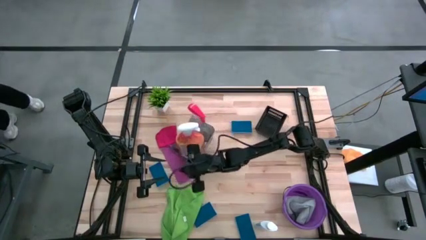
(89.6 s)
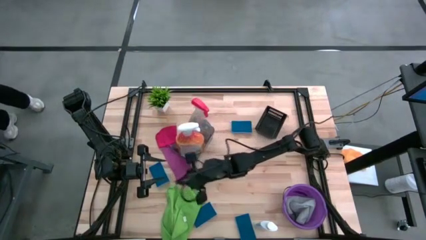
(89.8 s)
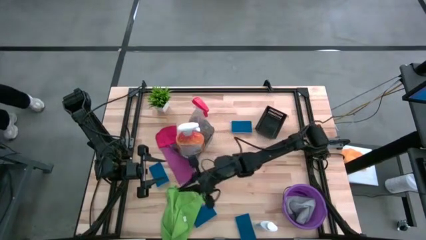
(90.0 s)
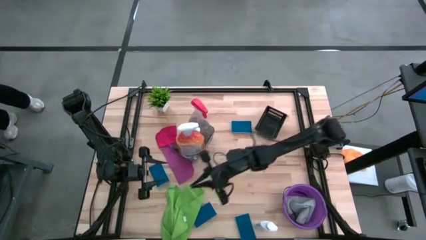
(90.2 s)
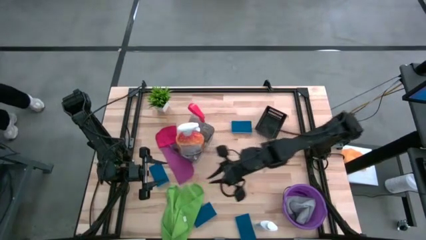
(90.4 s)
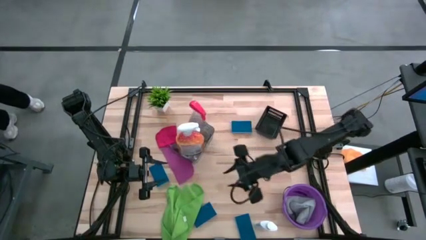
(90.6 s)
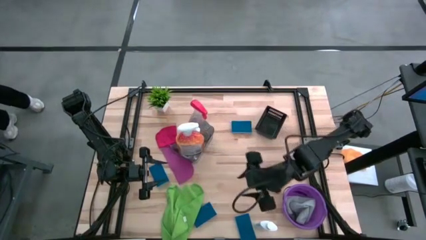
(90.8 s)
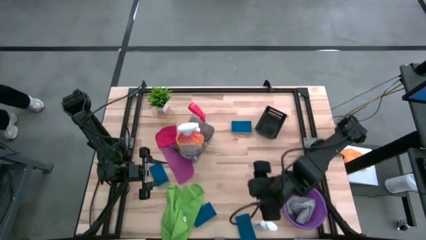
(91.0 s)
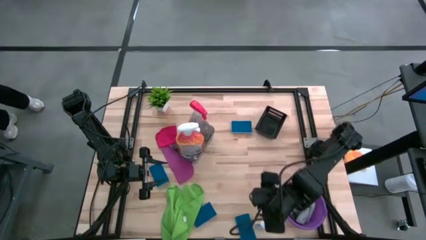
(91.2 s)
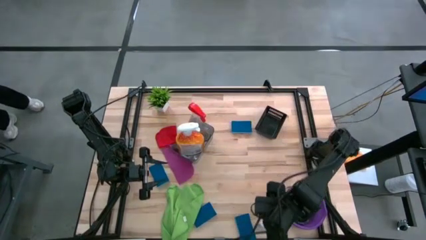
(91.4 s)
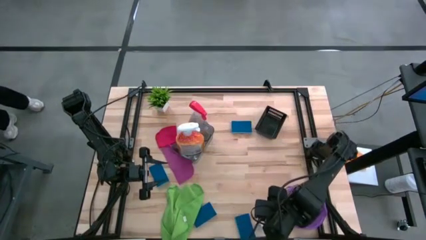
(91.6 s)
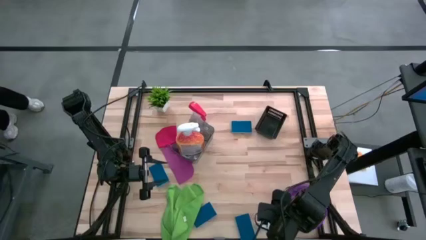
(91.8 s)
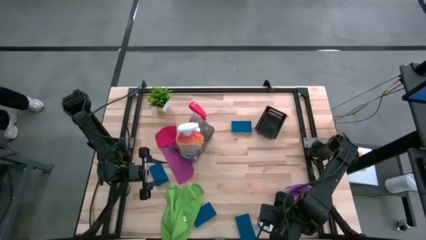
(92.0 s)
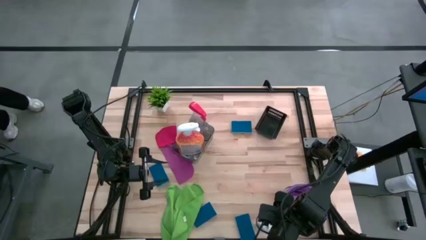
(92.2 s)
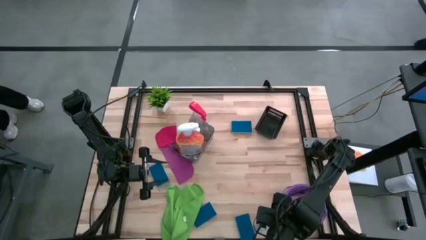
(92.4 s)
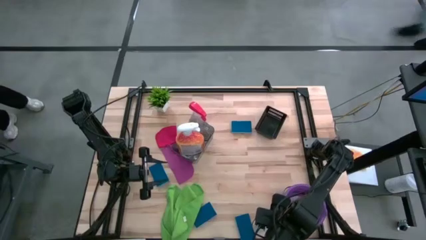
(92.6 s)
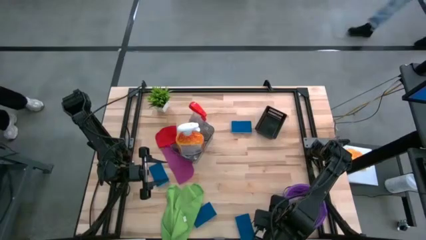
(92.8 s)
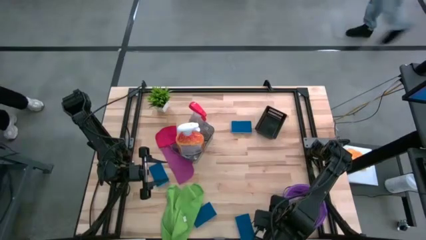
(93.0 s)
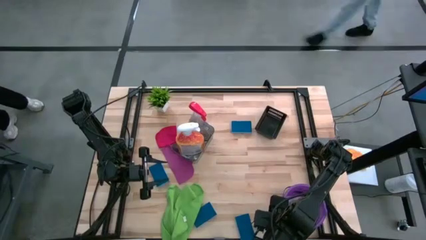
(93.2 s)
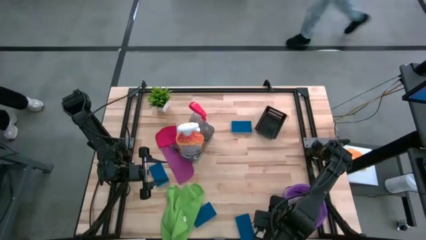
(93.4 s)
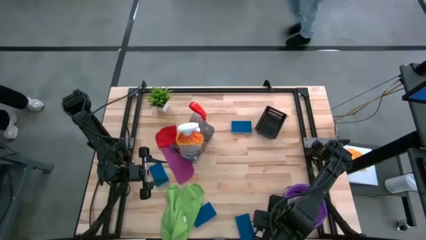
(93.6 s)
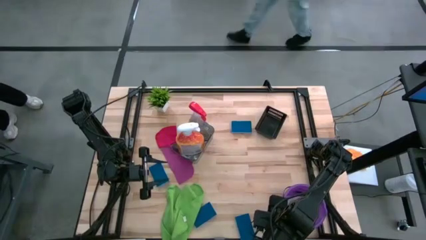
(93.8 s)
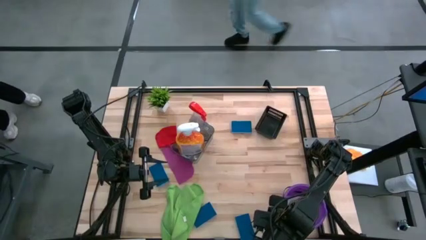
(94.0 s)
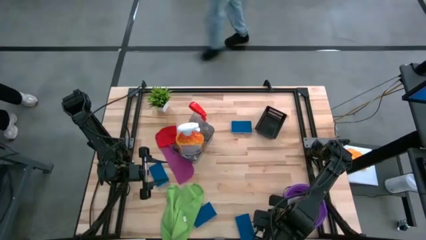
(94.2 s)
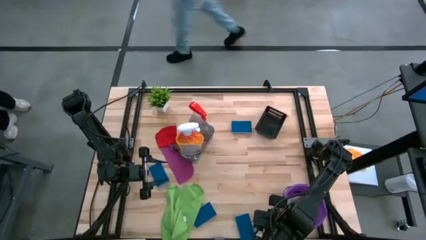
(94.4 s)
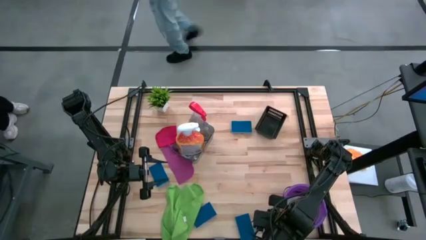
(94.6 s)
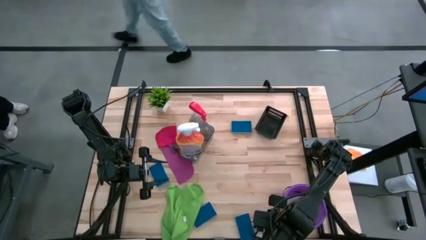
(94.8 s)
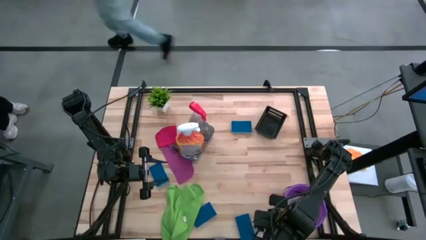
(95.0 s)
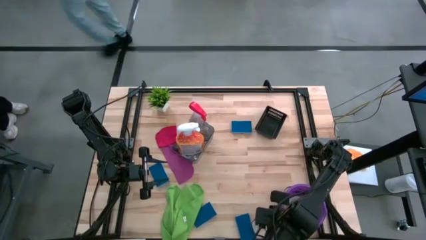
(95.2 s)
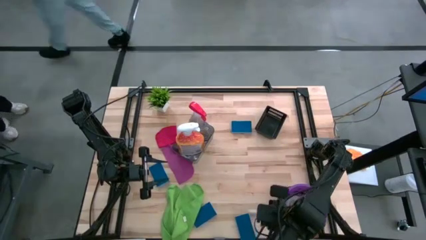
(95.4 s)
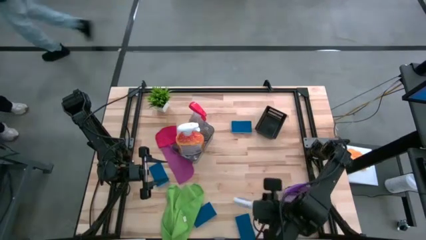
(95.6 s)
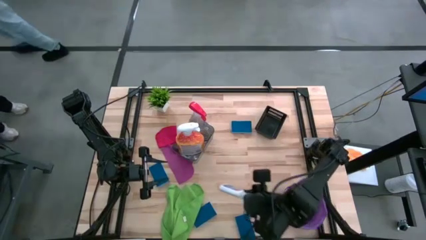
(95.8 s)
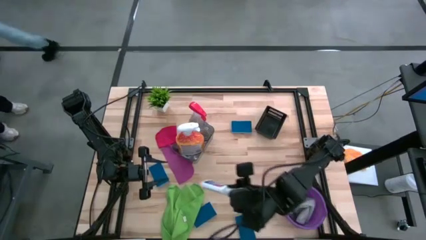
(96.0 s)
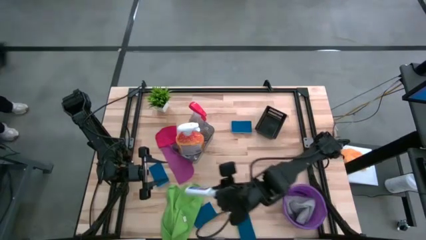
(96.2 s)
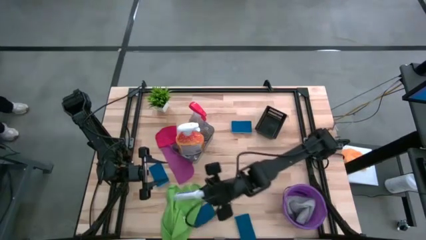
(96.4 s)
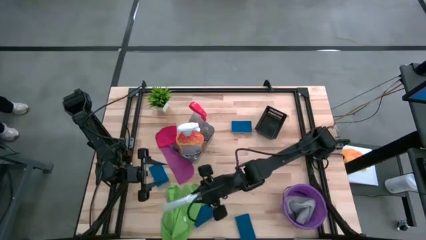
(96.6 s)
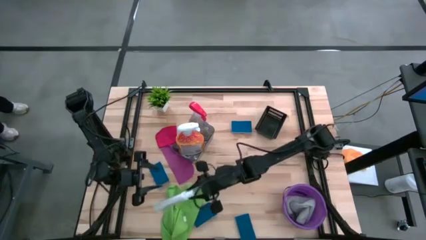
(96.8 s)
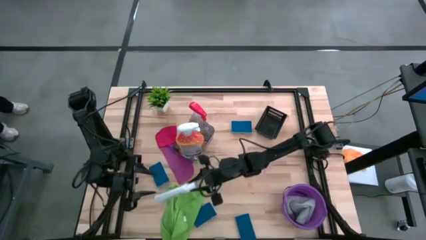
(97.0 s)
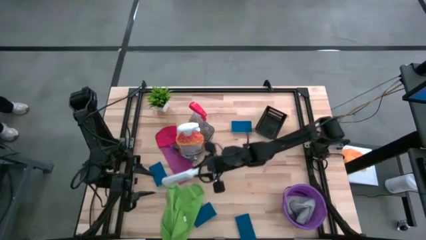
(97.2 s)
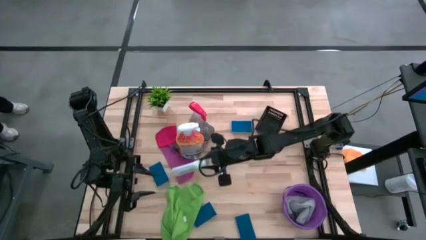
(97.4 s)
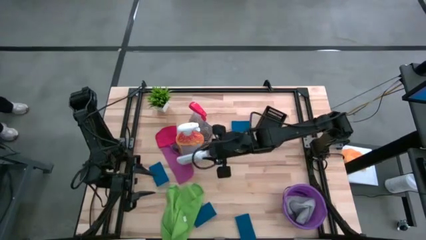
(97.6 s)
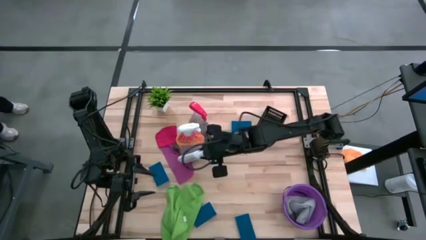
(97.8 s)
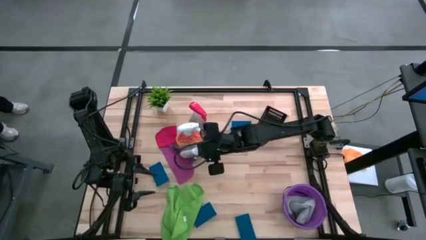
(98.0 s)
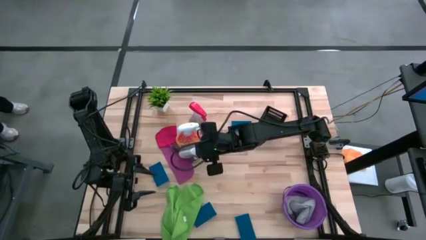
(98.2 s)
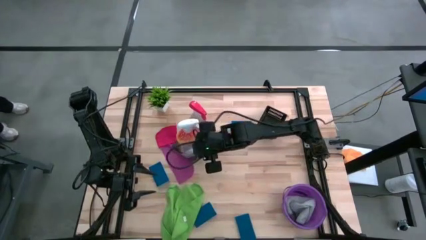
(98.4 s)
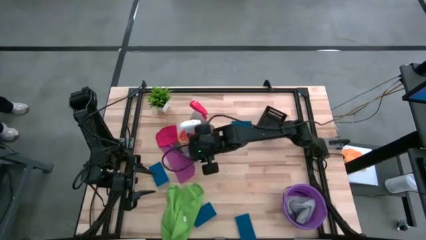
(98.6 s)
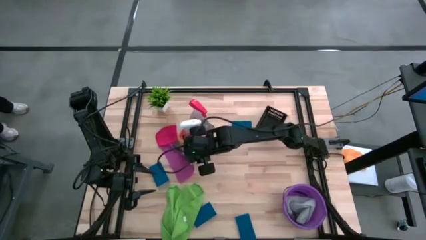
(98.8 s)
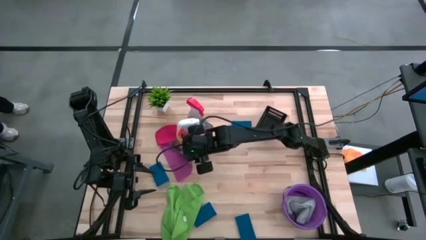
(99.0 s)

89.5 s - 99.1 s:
Task: Pick & Place Kitchen Items
Put the white bottle into the gray bin

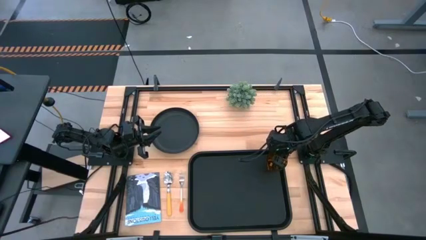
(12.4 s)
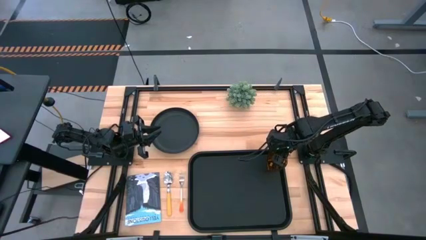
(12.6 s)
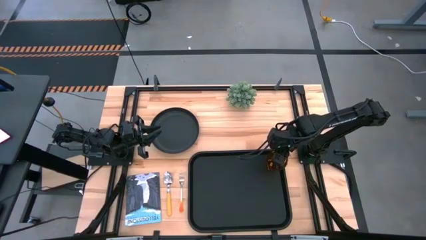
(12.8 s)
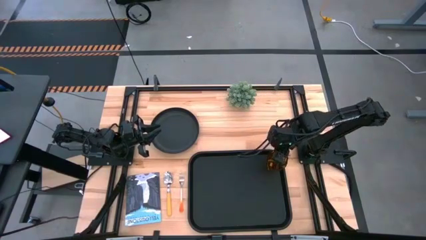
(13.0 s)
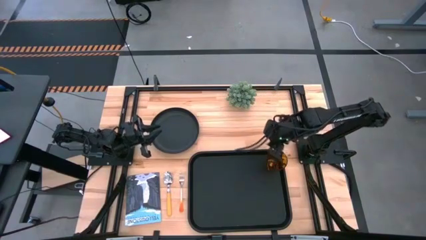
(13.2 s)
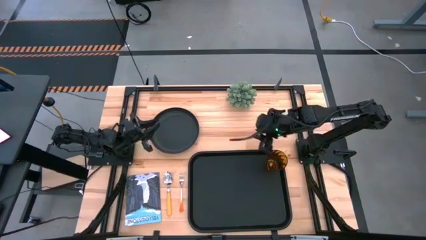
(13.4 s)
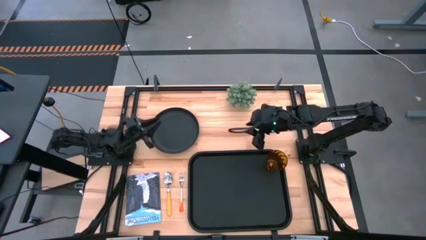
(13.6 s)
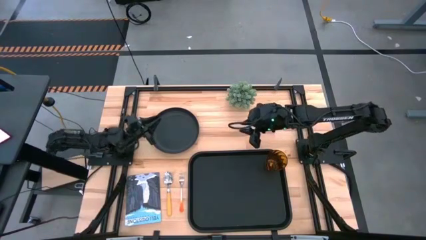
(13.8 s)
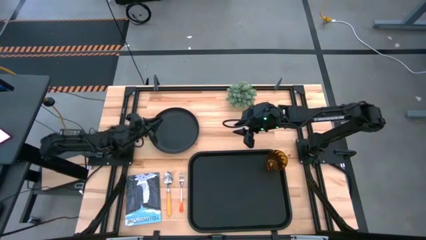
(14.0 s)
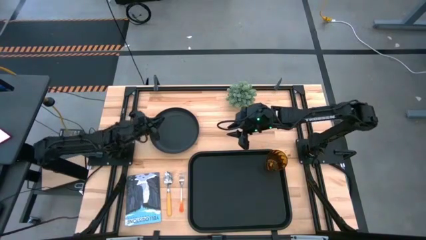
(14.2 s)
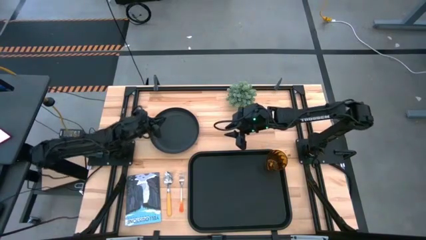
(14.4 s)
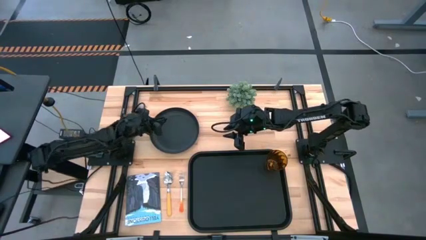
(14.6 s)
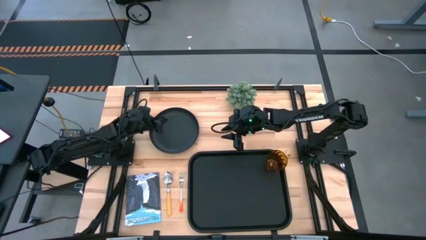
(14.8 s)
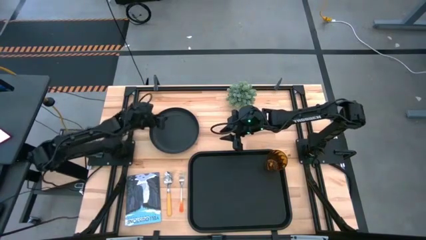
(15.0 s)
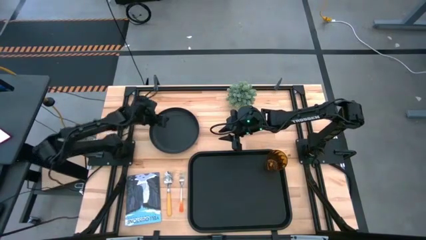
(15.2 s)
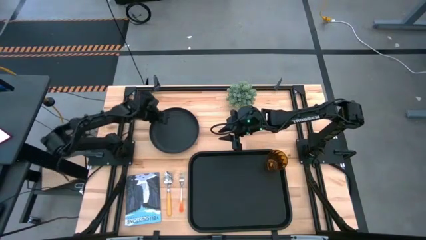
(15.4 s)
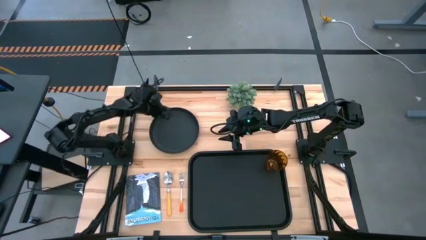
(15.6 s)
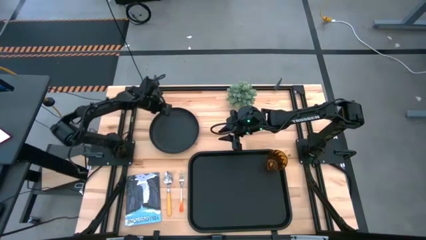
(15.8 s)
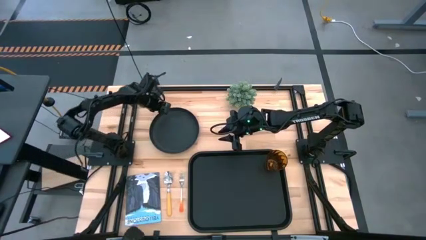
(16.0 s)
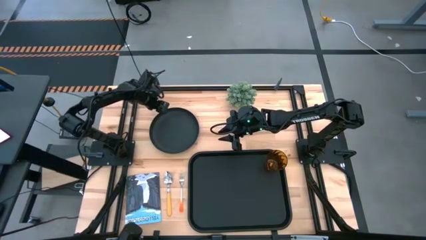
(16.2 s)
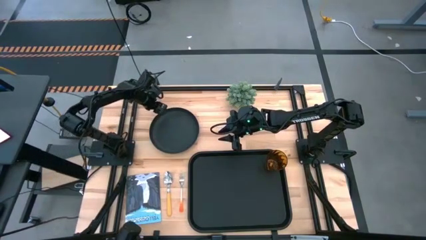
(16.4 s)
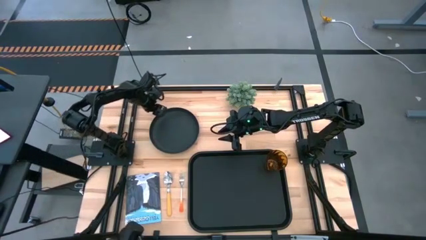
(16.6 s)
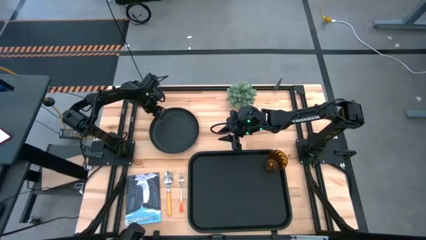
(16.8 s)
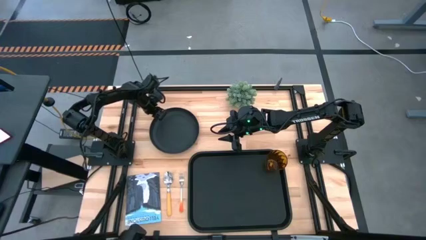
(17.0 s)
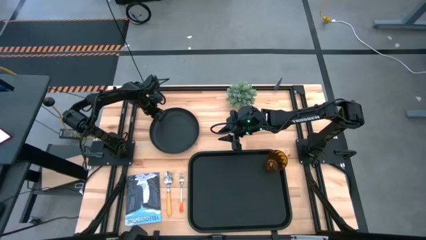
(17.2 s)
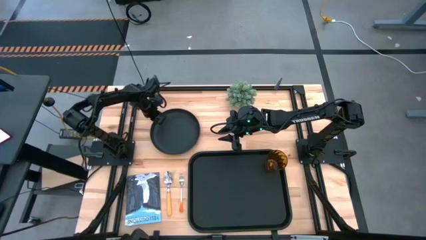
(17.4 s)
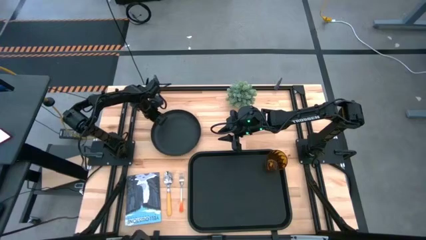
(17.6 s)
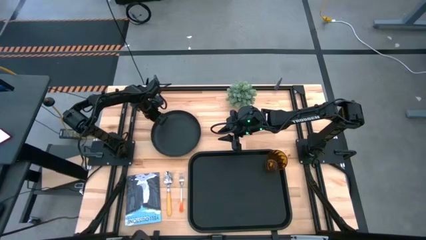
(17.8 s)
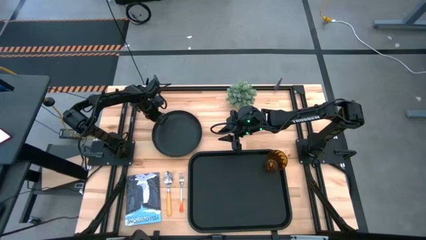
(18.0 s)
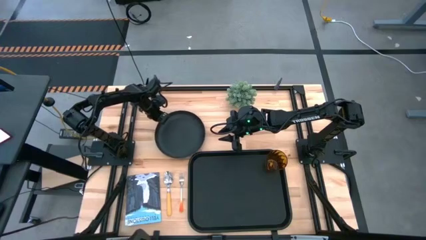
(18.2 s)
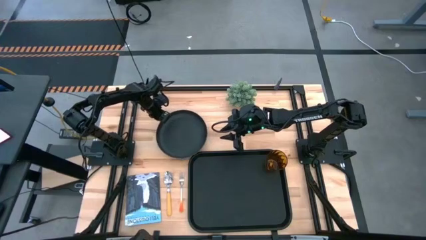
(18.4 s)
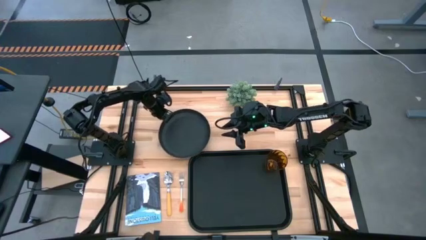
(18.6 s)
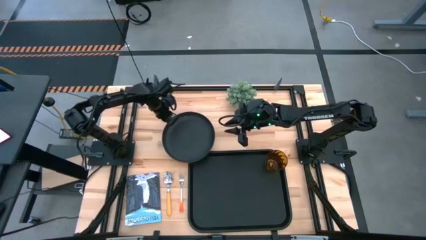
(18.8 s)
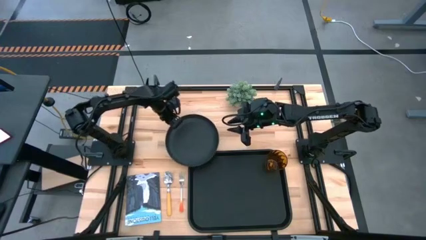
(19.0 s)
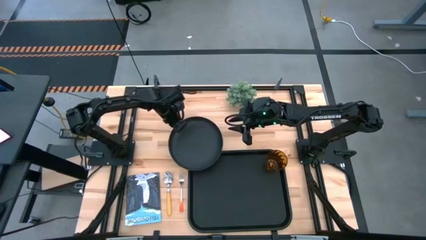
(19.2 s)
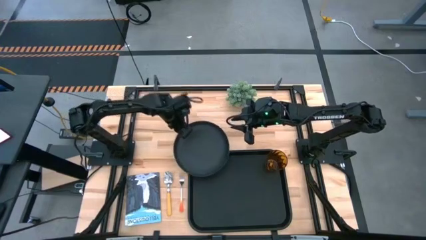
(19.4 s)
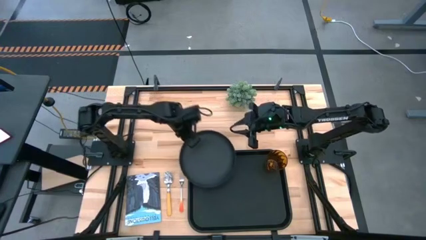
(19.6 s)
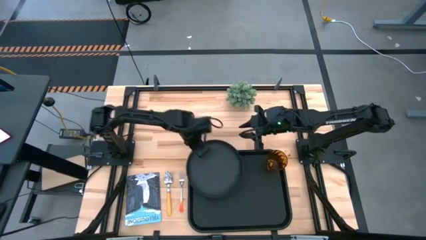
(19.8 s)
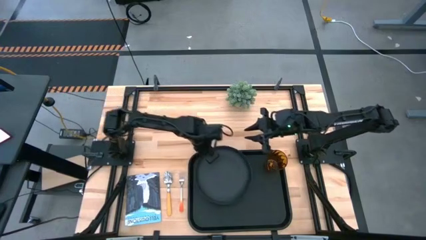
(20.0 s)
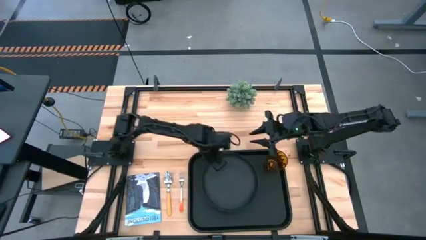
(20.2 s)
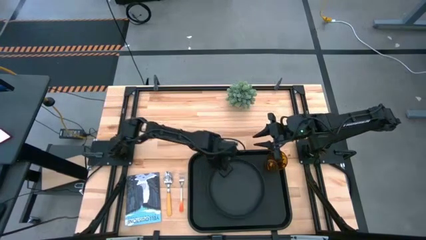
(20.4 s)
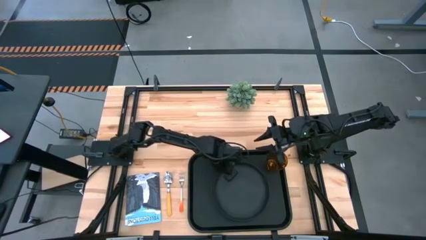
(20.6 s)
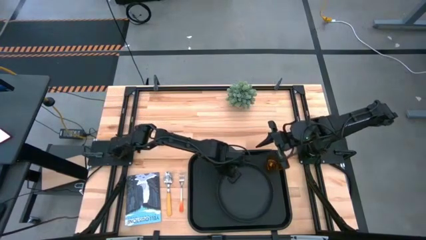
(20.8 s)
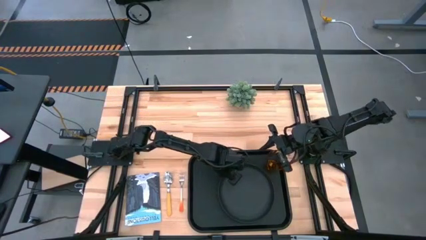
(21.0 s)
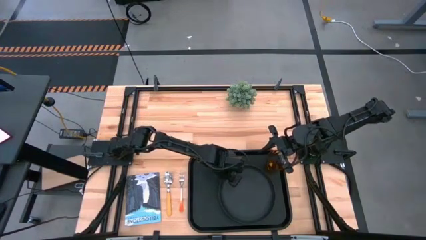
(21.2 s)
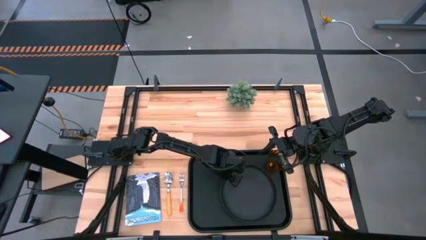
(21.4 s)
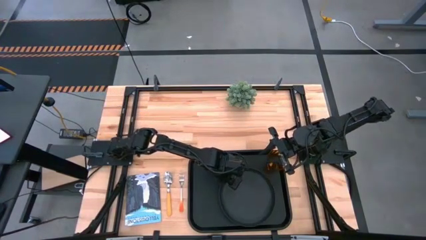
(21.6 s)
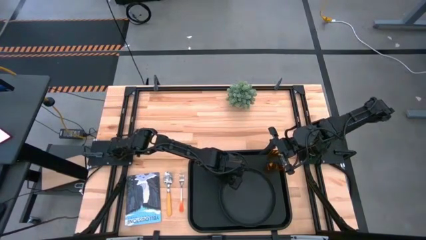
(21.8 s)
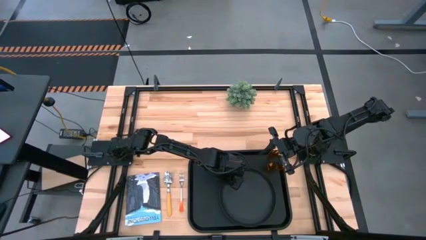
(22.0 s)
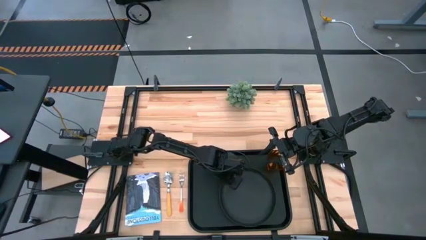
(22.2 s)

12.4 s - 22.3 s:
Task: Pick and place plate/cup/fork/spoon on tray
Put the black plate on the black tray at the bottom of the brown glass
